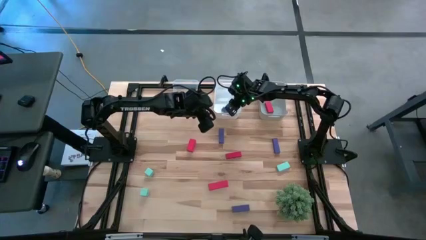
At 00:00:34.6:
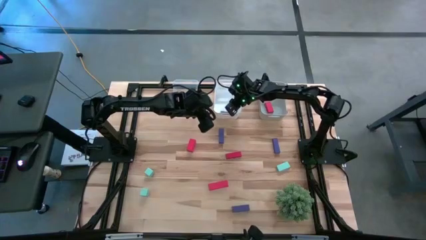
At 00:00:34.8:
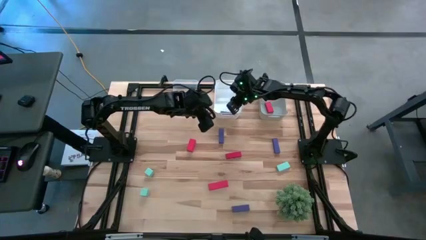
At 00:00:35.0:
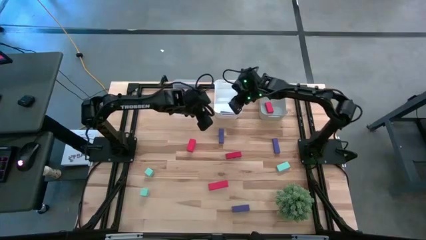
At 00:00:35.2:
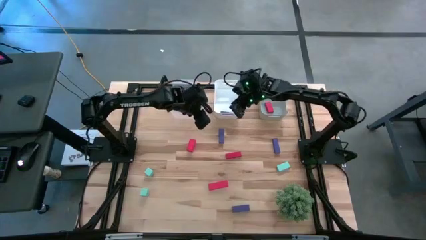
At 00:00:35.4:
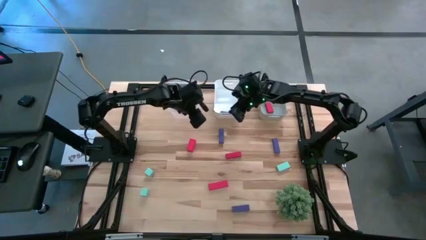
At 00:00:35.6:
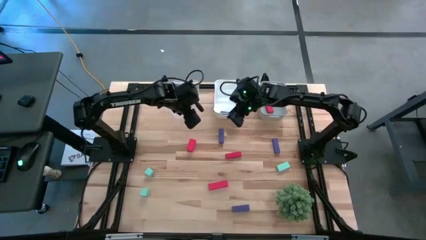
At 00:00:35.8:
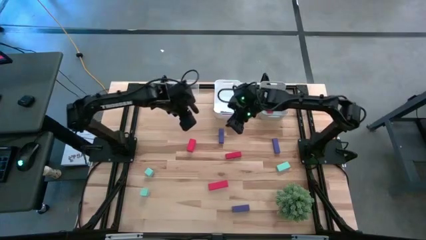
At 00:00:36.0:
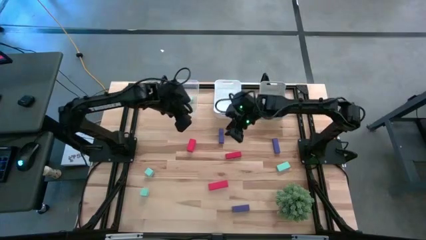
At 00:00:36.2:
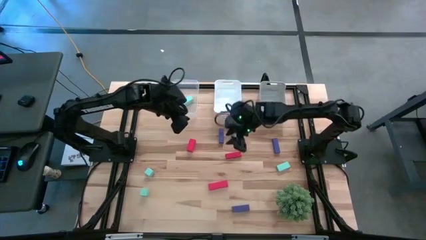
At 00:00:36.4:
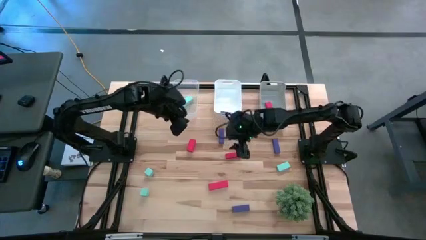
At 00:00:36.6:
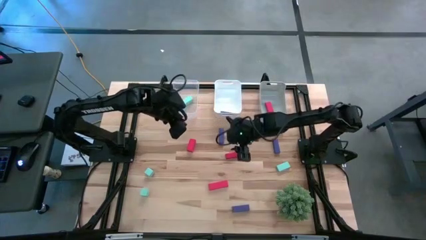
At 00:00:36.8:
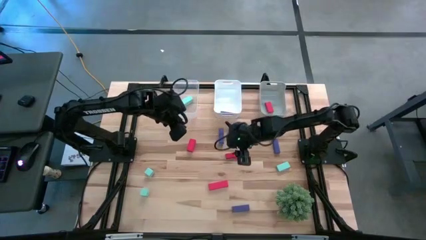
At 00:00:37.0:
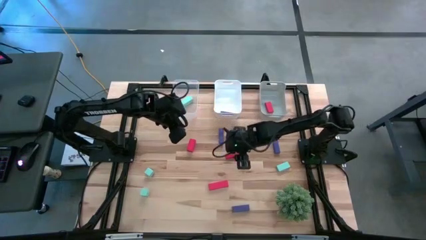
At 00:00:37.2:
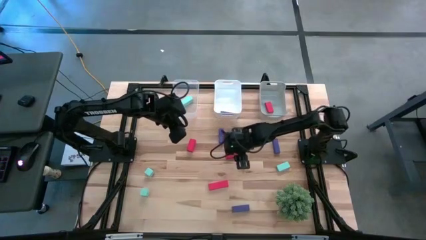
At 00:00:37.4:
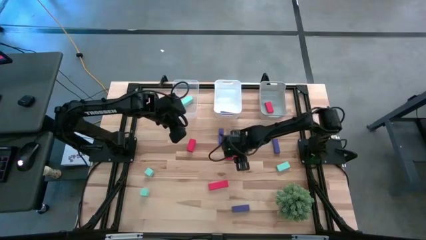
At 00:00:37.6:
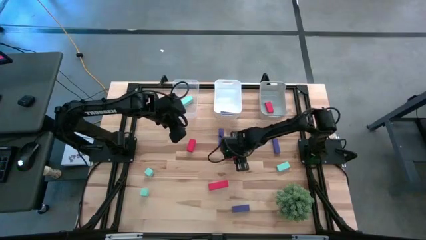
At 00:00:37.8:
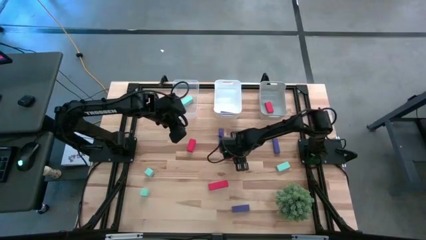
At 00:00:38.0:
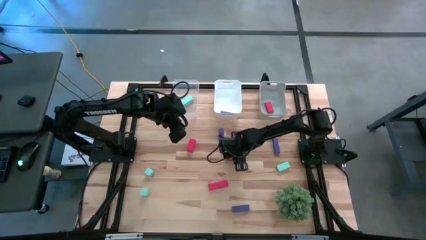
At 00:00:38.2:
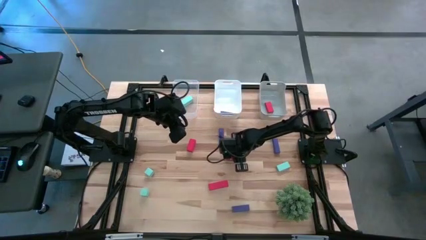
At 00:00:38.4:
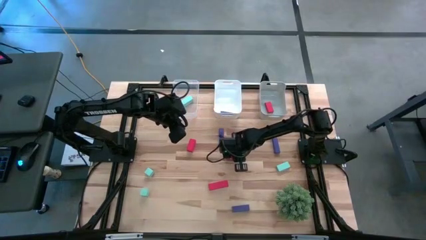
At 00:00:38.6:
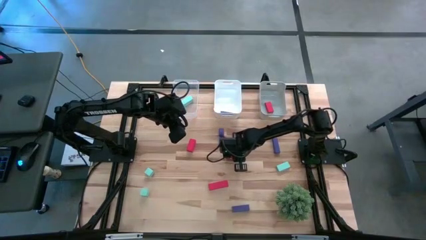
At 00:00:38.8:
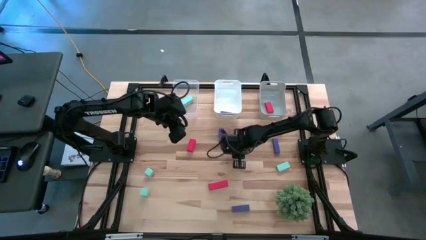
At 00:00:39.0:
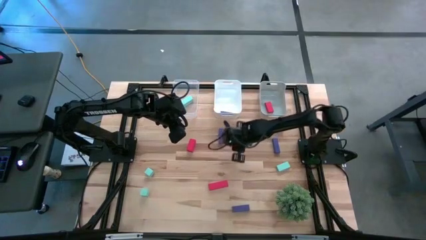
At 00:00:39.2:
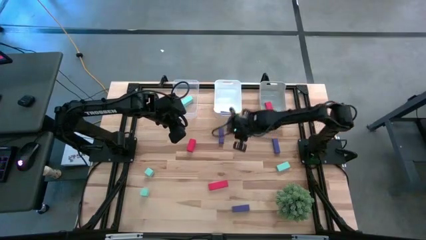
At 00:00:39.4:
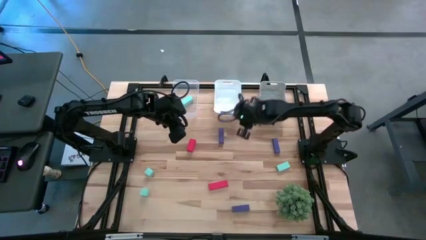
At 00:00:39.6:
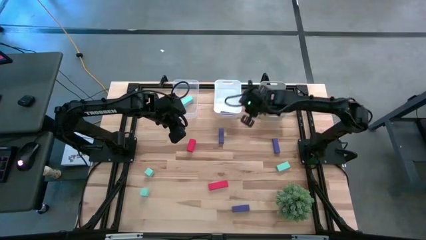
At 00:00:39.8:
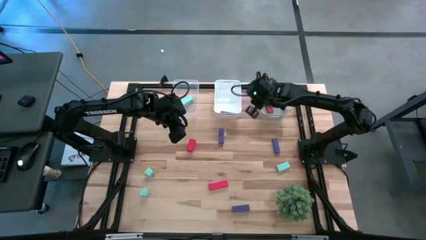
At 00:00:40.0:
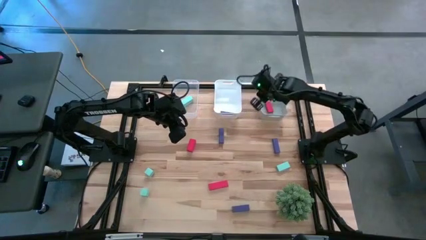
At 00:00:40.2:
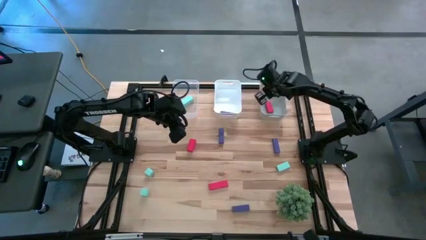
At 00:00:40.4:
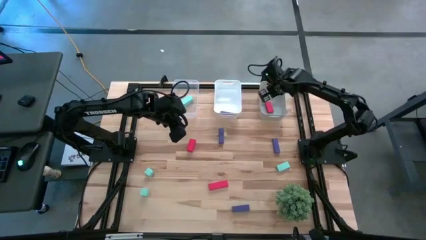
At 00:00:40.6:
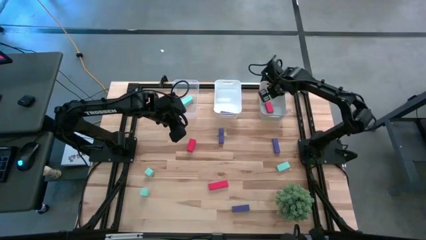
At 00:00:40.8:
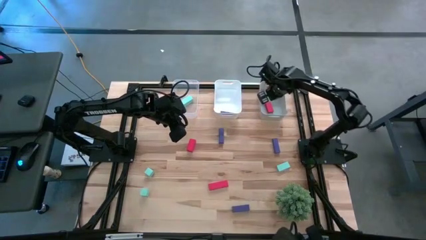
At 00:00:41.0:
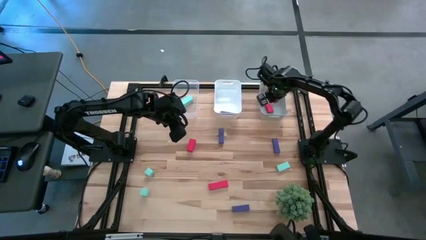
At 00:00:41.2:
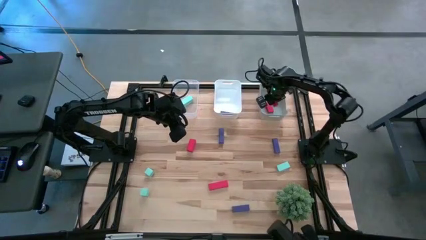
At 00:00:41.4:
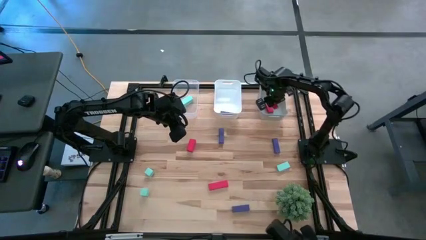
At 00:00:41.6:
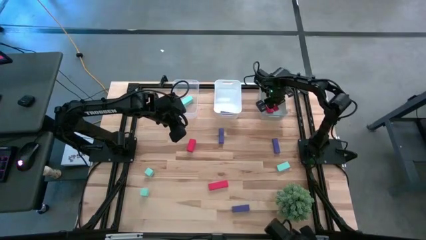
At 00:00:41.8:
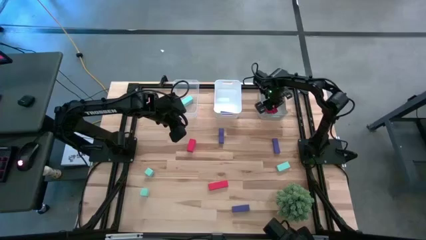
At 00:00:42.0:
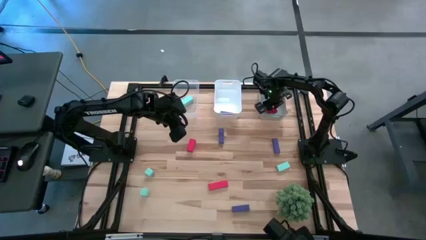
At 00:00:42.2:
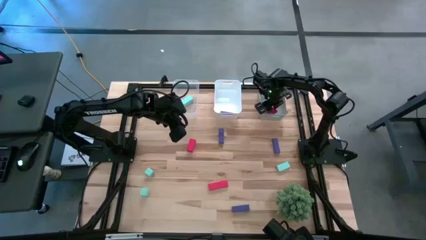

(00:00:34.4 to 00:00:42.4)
Task: Sort & place blocks by color
Put the red block into the gray bin

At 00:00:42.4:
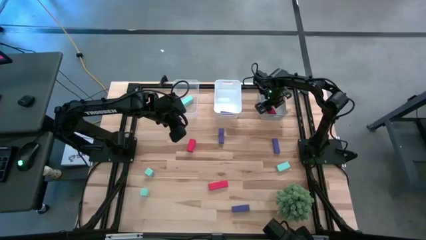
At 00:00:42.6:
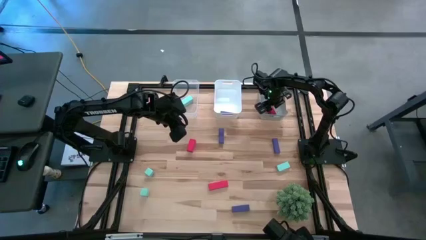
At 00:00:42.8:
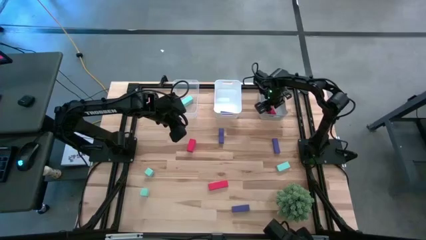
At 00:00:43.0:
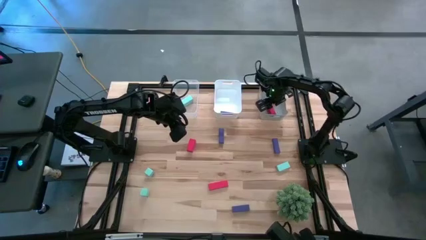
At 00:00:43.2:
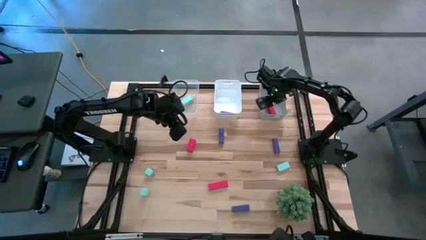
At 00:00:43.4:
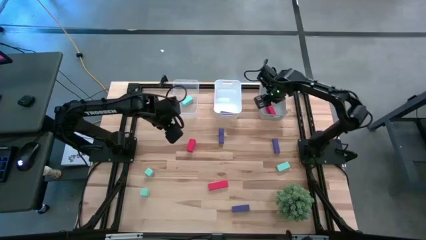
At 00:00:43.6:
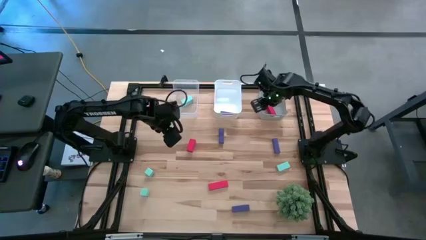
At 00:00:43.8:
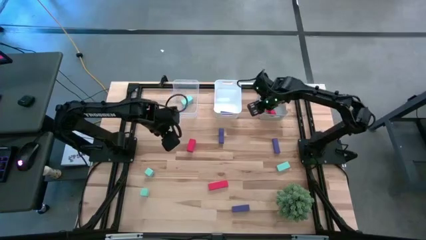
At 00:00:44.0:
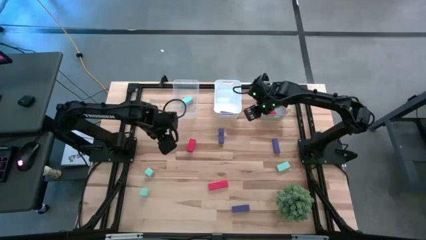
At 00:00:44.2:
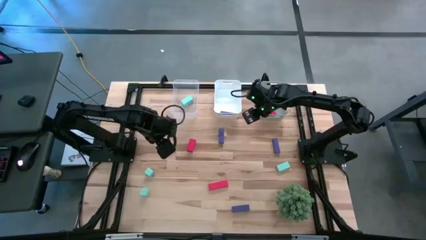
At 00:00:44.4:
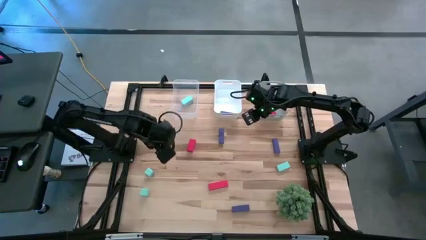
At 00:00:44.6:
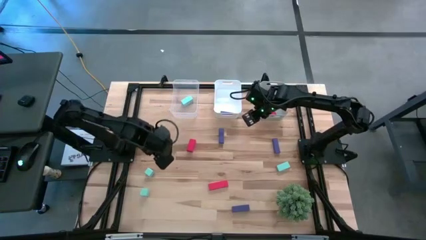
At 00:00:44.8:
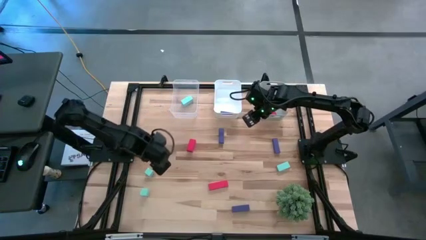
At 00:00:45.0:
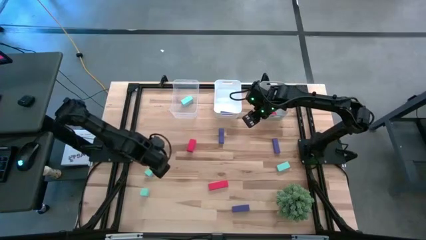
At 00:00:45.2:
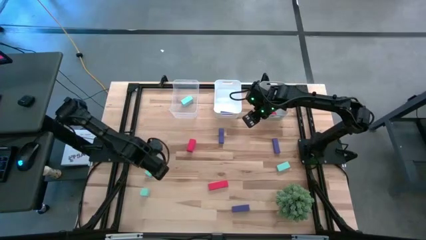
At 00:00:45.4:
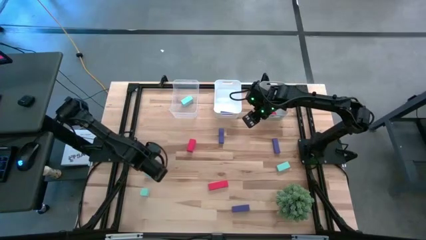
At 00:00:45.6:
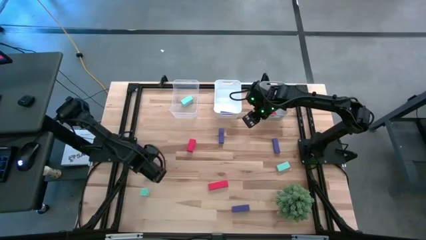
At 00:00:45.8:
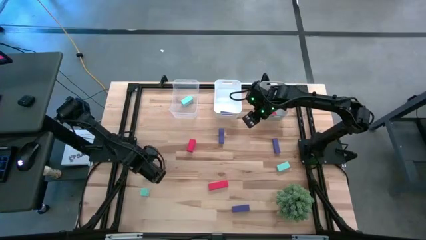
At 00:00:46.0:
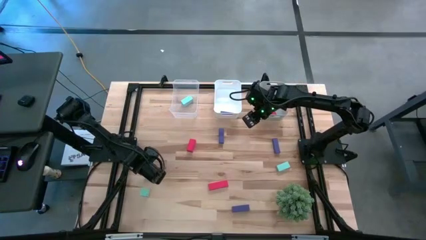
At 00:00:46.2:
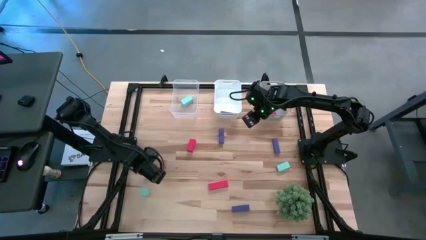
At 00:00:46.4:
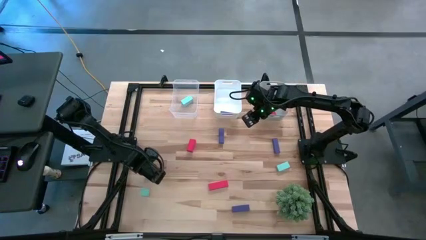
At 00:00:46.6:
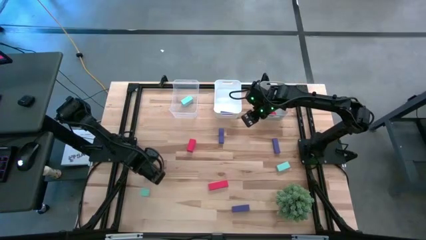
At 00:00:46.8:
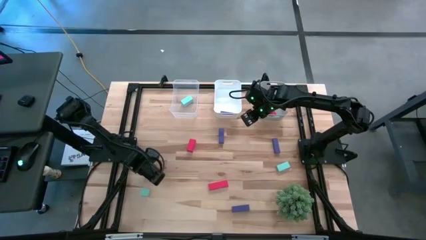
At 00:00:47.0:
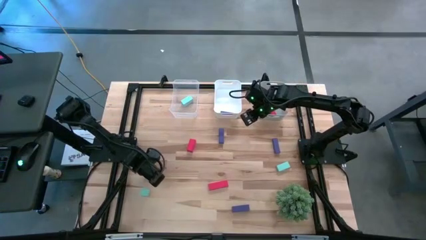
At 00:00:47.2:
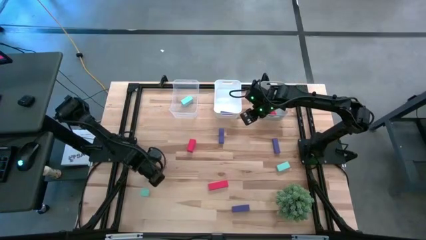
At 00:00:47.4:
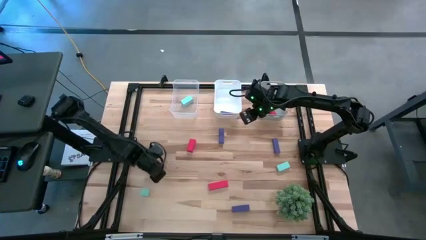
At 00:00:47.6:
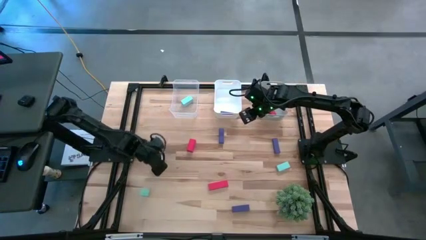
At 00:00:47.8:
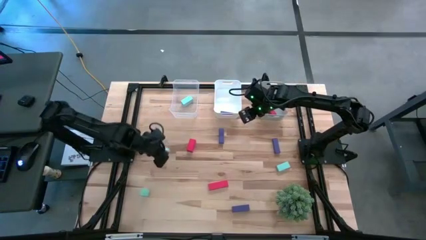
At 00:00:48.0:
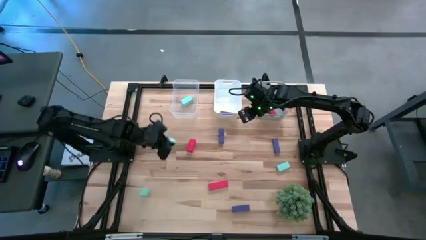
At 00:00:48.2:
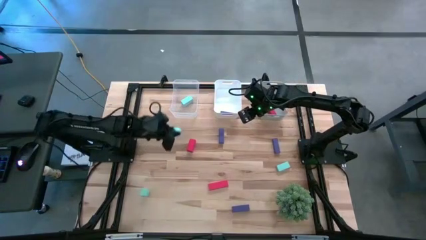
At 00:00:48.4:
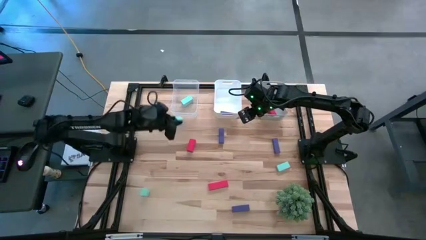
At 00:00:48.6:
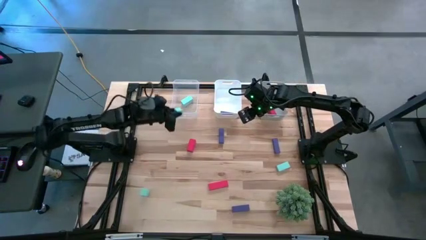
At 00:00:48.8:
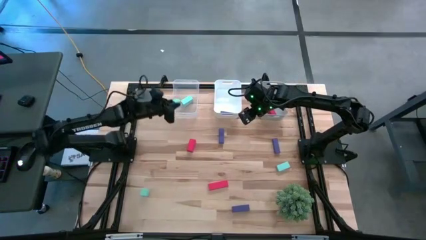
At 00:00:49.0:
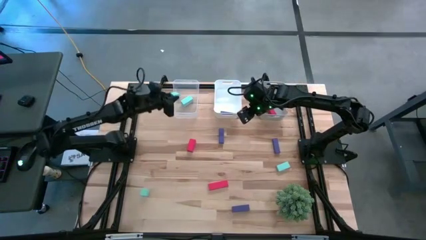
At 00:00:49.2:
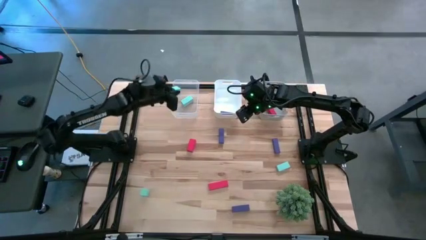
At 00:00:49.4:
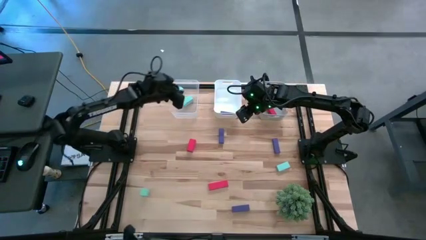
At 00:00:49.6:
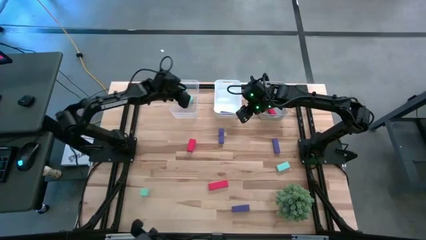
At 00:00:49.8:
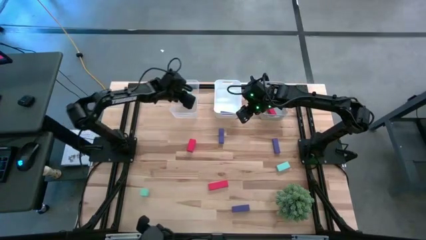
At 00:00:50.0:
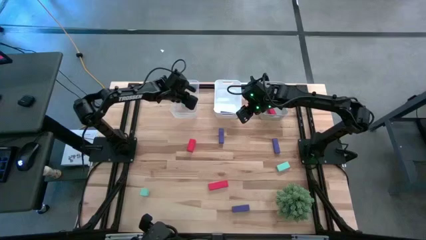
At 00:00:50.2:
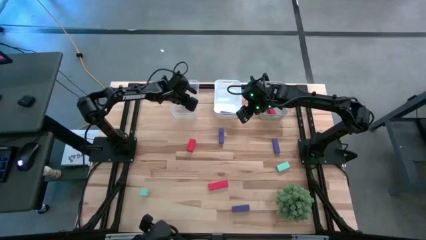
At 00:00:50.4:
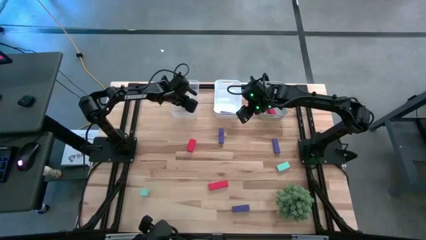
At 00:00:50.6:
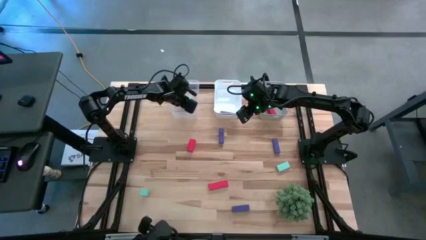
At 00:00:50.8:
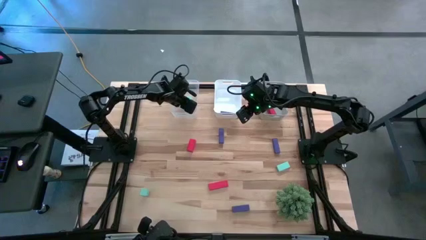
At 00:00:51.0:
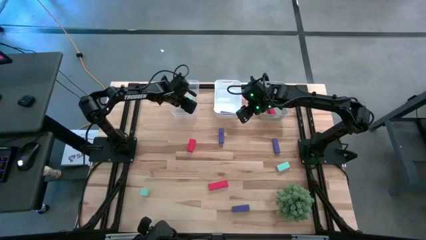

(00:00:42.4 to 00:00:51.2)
Put the blue block into the transparent bin
